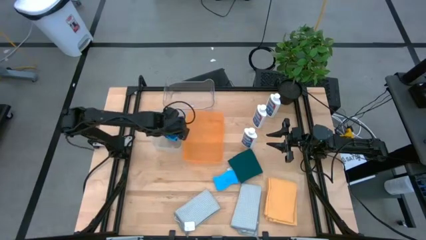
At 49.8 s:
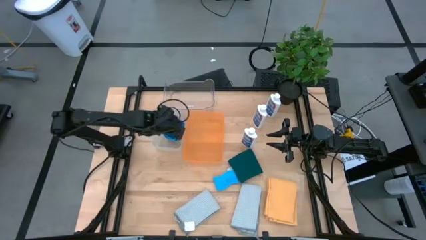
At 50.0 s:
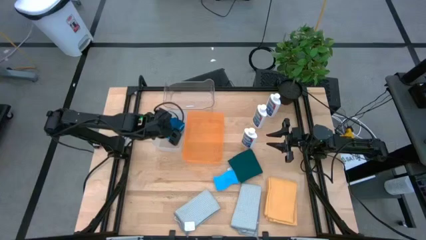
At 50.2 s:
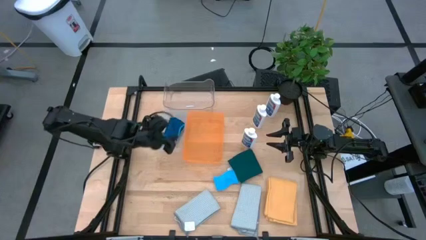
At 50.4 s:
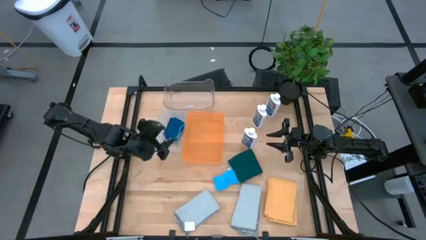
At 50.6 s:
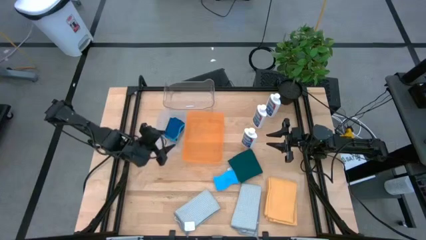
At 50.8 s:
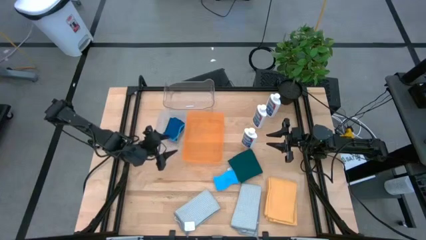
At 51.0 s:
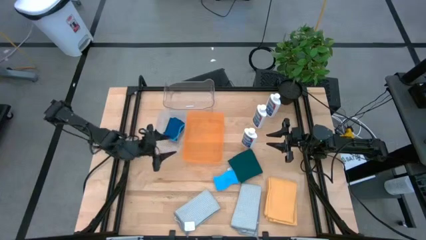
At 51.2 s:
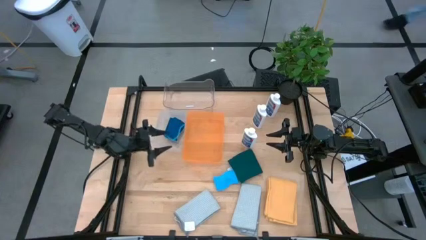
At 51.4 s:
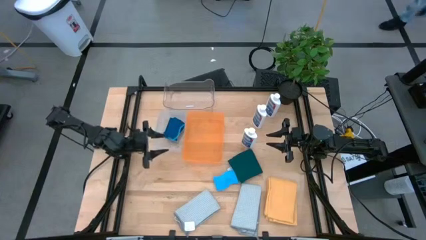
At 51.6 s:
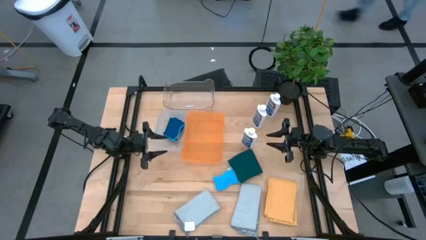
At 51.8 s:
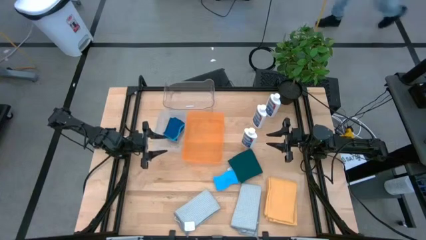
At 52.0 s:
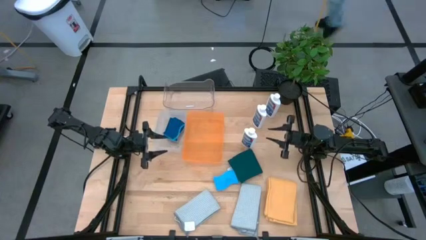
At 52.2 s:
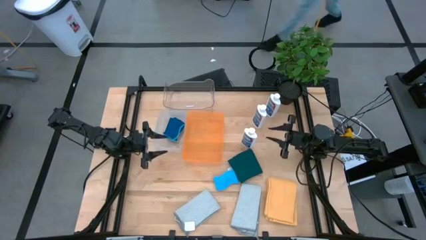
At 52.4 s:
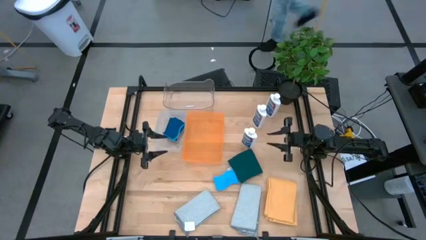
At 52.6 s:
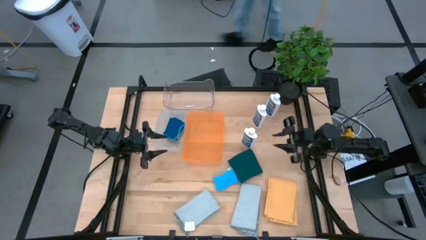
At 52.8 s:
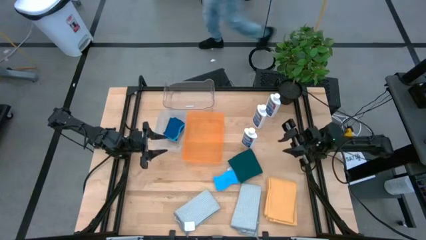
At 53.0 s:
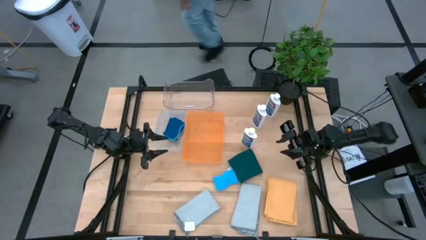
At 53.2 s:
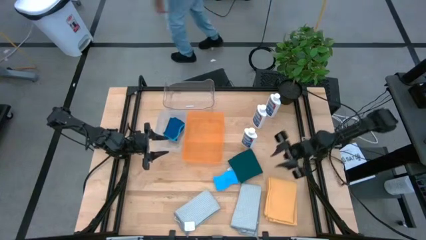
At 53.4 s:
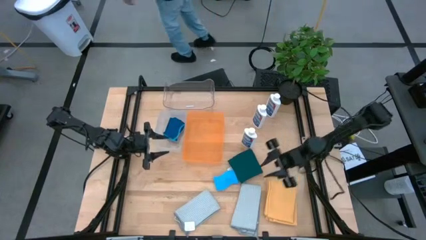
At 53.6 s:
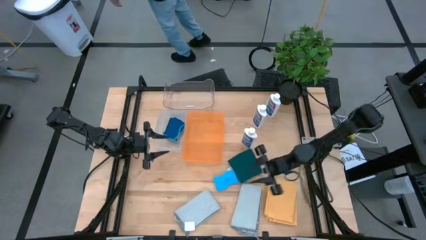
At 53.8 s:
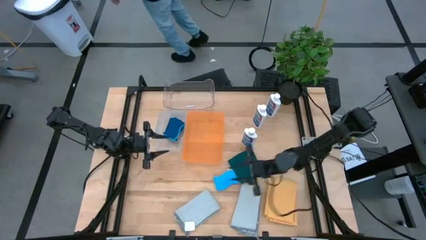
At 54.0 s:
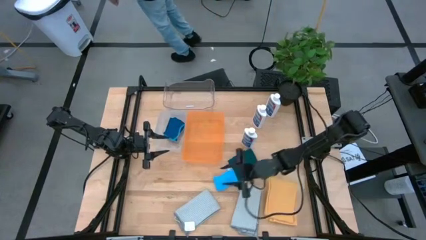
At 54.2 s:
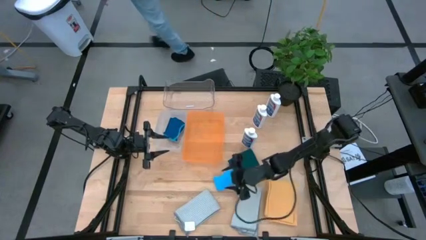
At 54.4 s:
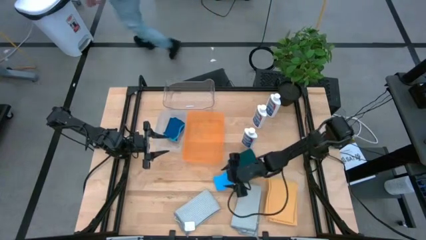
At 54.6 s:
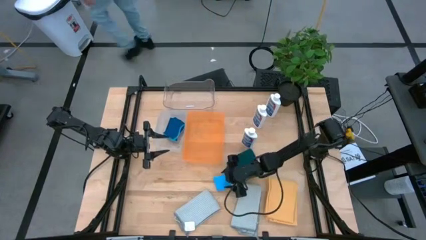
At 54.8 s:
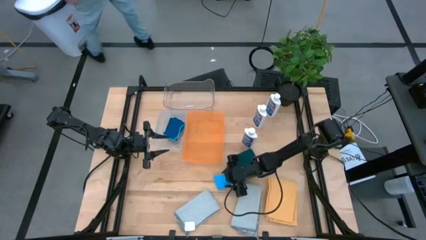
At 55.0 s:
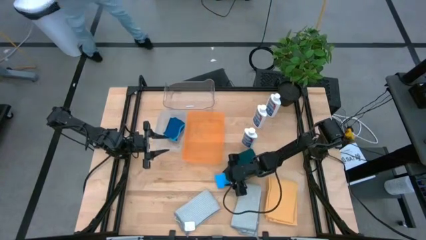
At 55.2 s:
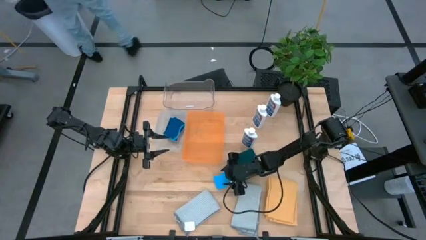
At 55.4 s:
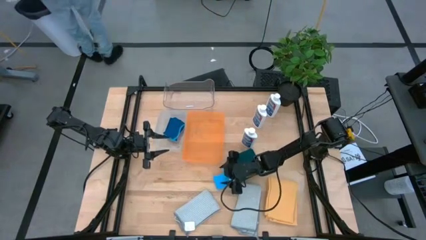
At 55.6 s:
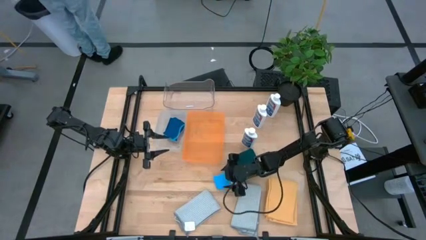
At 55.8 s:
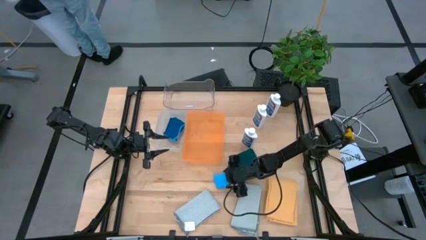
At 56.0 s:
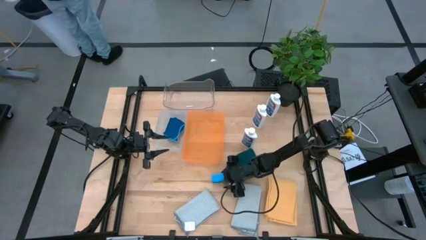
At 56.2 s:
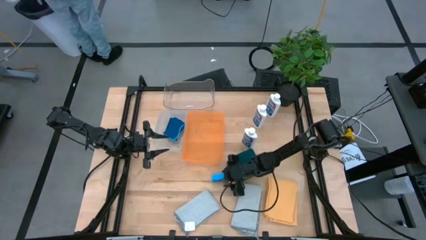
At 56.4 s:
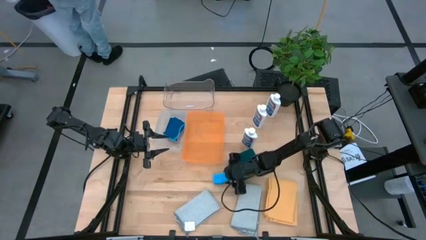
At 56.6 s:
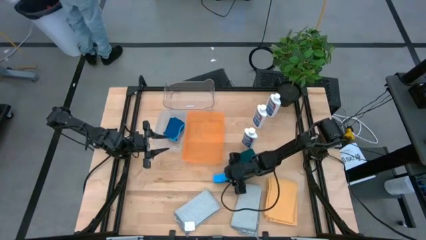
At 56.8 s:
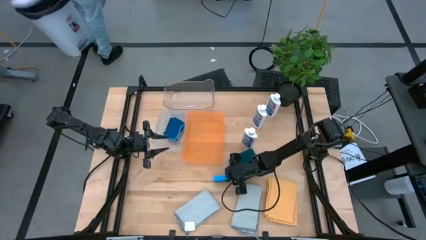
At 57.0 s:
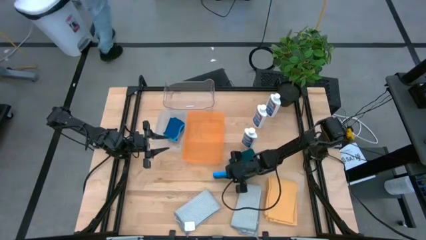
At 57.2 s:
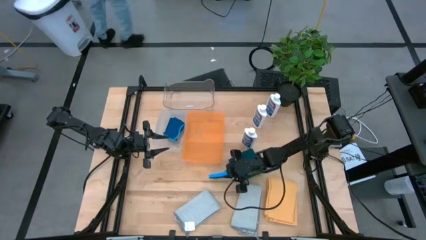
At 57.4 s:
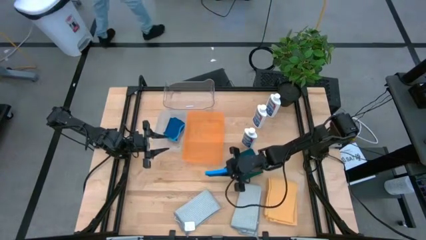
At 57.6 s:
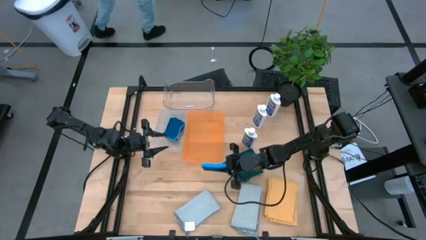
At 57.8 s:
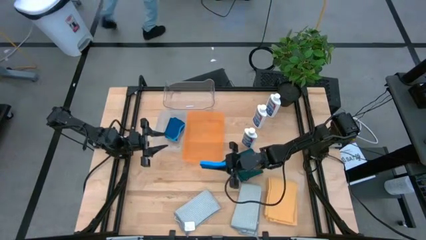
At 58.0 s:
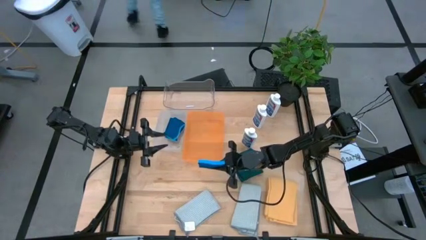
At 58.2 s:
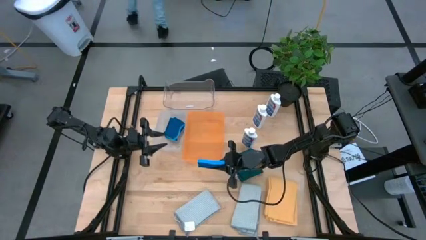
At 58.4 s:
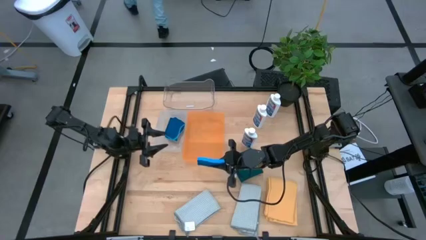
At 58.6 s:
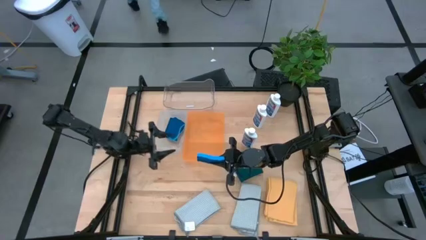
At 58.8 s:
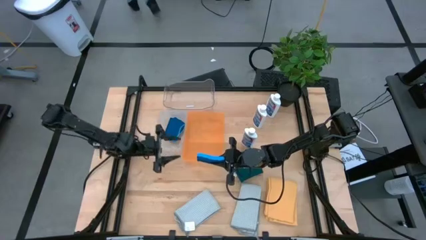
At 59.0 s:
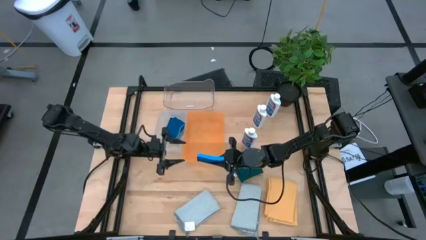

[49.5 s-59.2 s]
Task: Pick & Place Kitchen Items
Put the sponge into the white bin

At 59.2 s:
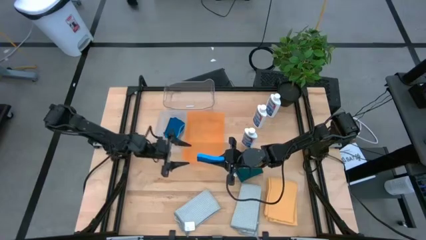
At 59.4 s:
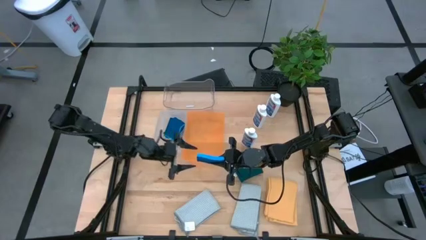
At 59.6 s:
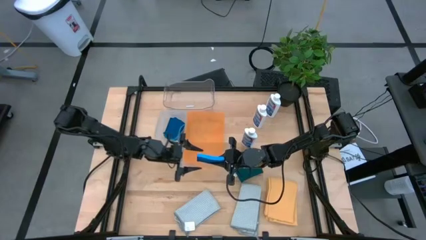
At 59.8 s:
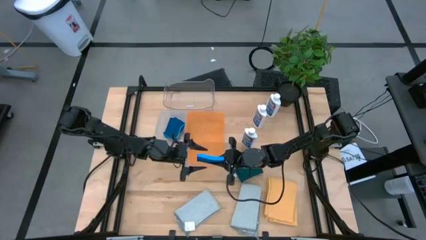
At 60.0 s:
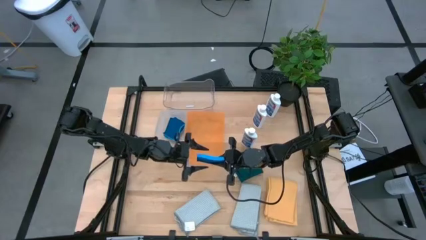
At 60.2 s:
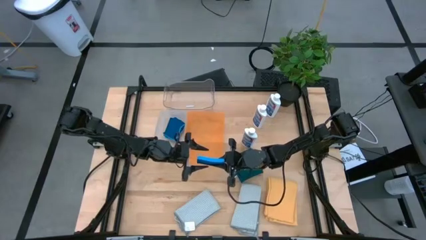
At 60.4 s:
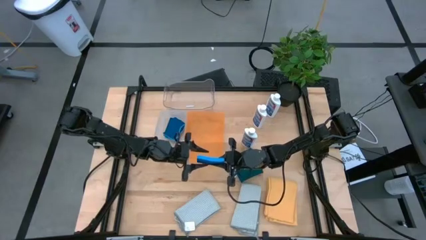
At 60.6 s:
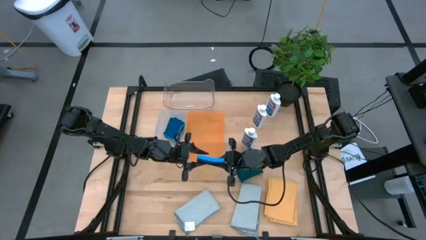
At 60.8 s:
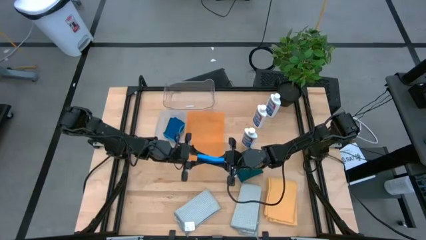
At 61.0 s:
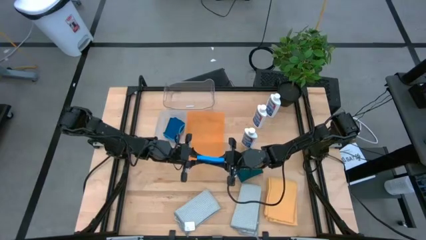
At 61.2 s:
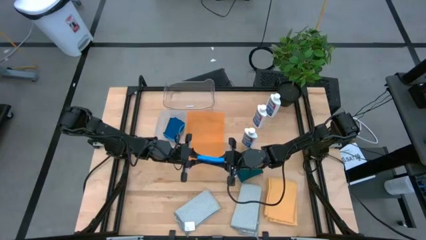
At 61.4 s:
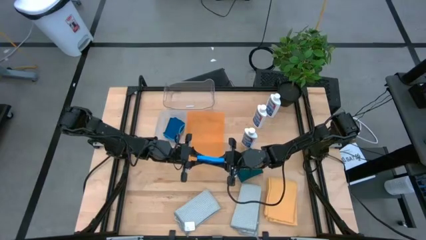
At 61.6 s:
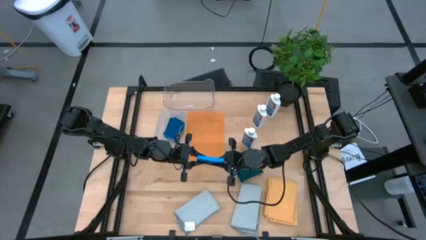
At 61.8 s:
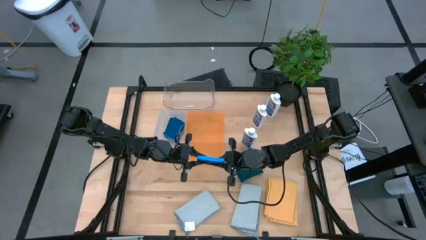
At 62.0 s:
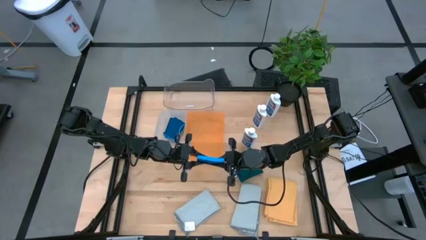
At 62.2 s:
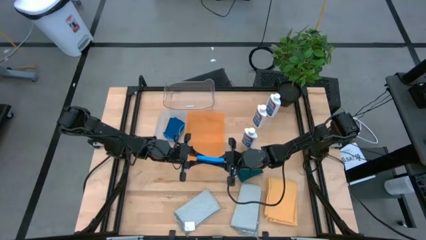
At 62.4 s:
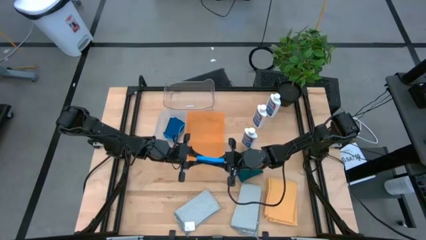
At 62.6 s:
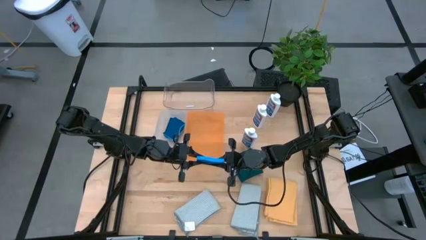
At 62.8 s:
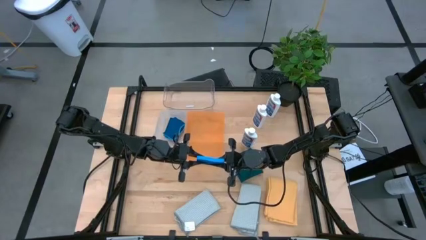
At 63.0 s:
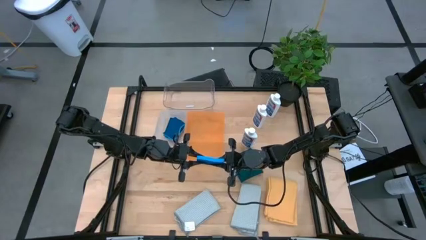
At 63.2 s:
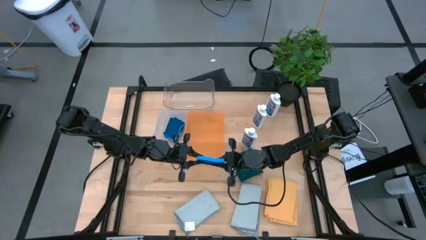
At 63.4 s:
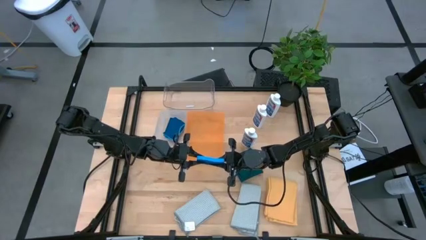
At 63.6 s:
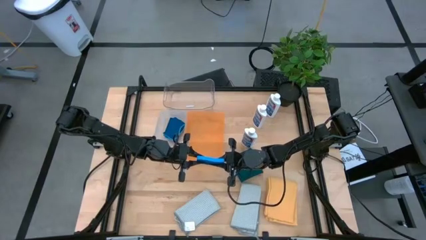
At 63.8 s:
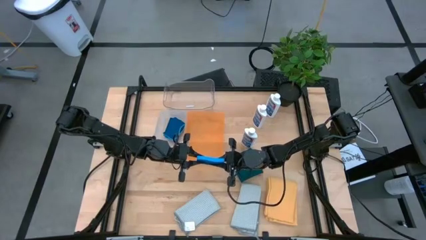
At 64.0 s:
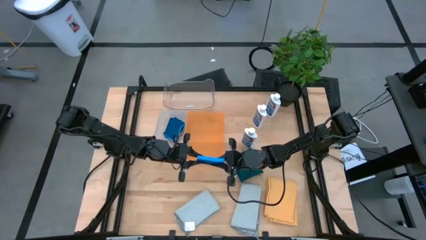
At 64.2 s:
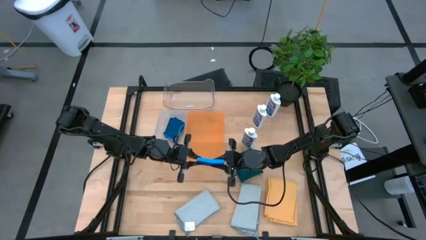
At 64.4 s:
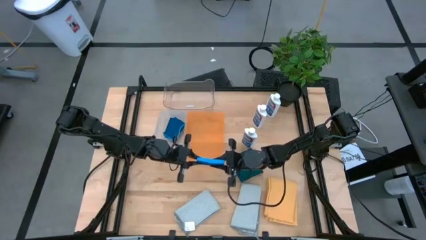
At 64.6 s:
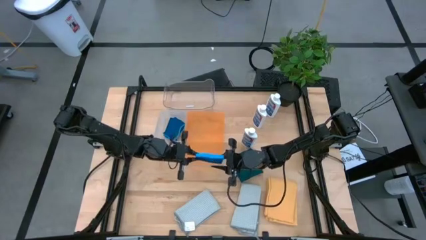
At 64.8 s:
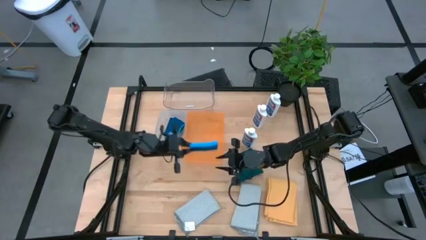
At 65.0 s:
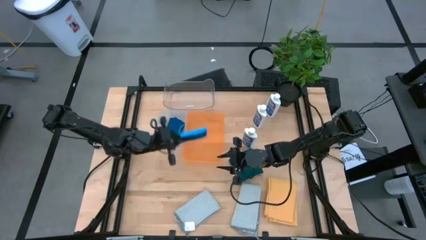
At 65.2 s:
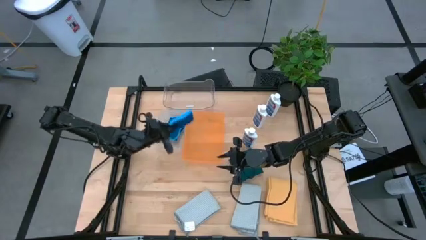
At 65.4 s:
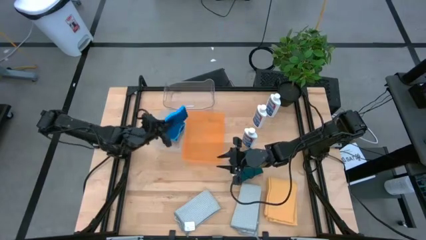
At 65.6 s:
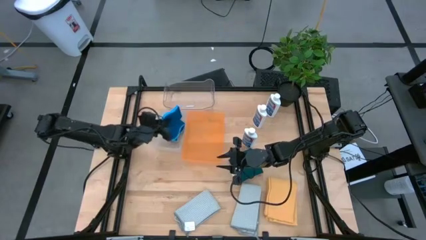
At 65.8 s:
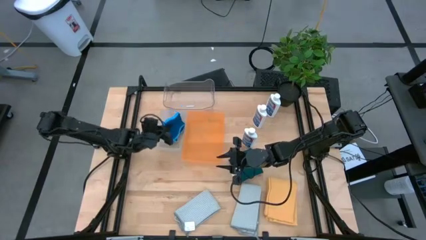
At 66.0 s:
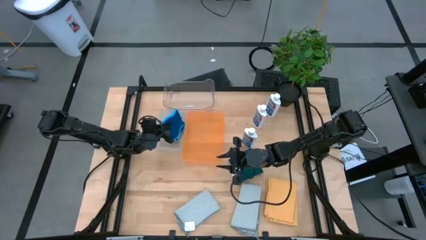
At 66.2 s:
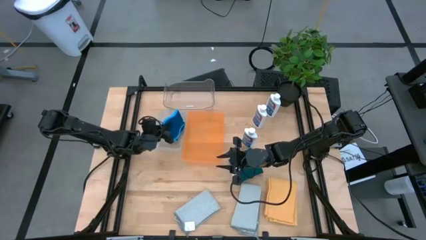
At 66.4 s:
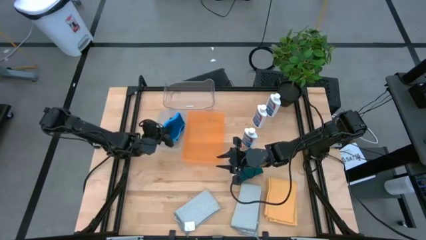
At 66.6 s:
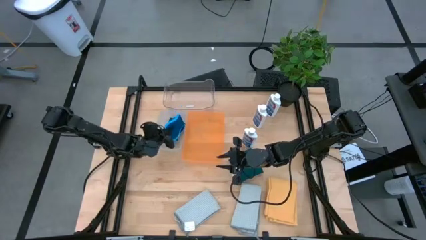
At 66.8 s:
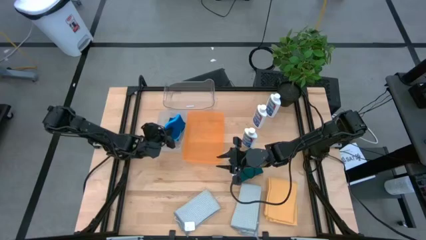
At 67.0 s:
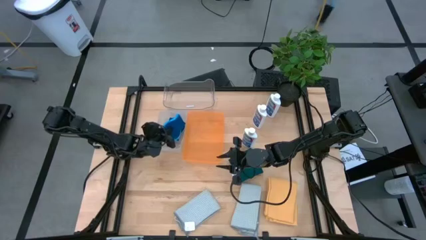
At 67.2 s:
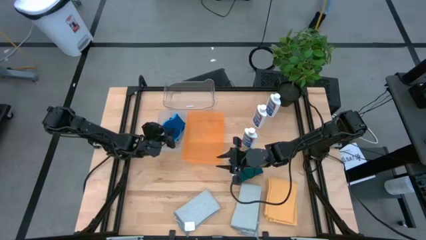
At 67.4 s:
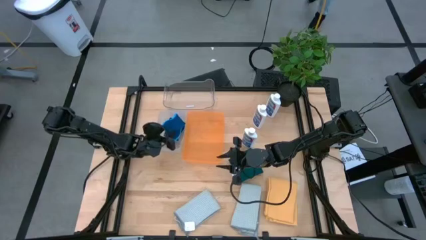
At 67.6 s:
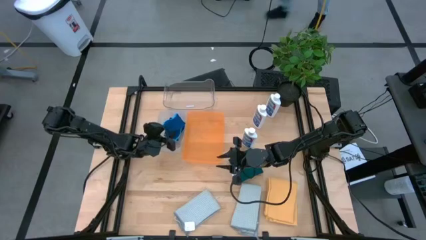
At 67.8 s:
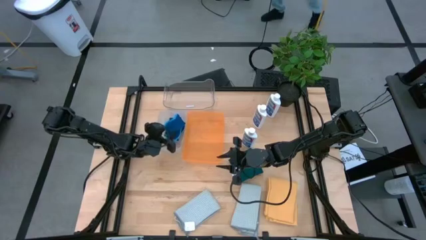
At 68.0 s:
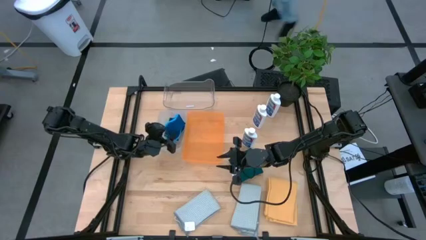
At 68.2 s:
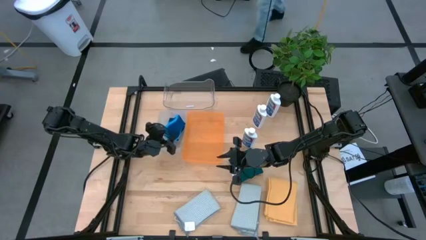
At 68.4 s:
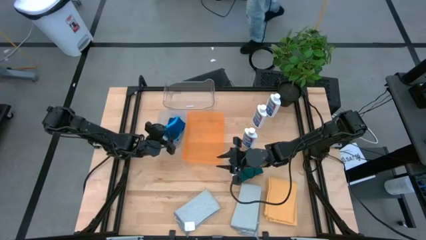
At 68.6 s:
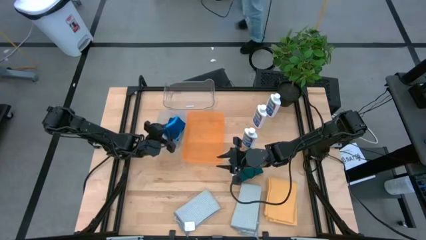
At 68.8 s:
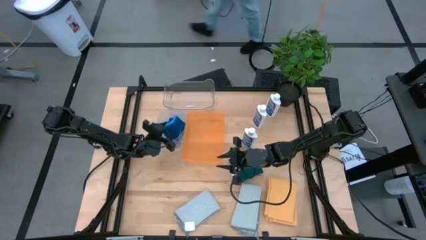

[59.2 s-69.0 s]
Put the sponge into the white bin
